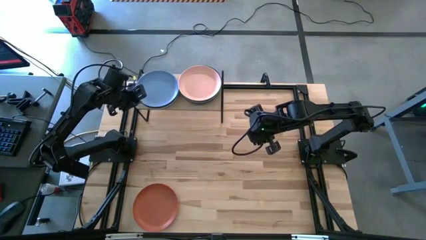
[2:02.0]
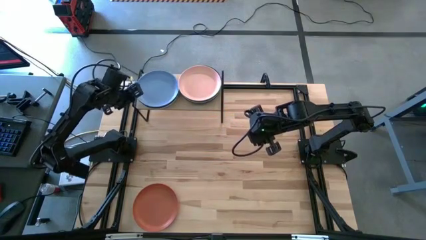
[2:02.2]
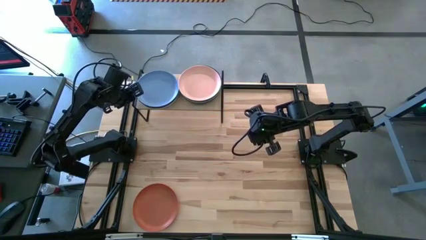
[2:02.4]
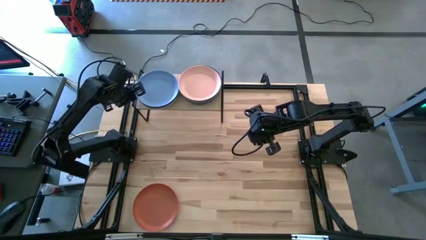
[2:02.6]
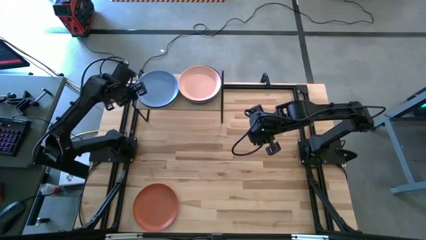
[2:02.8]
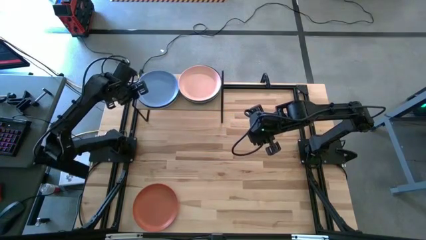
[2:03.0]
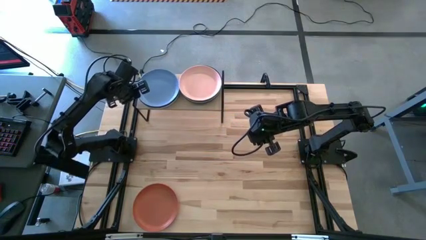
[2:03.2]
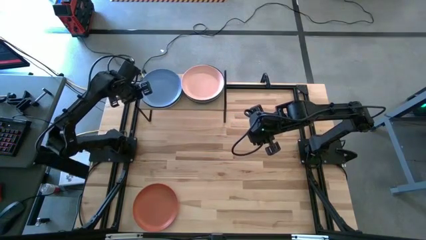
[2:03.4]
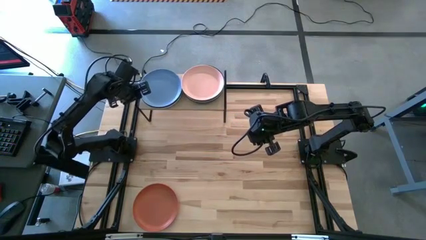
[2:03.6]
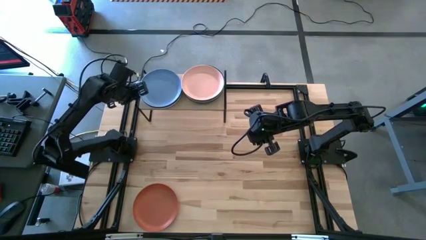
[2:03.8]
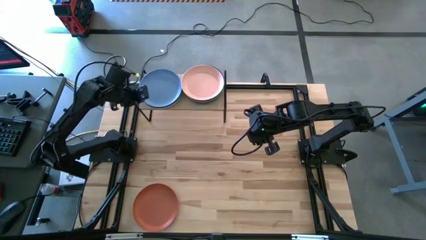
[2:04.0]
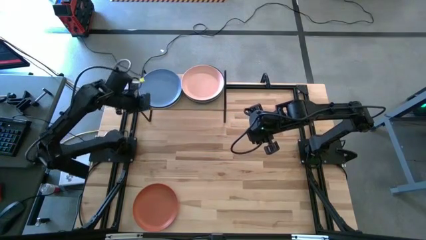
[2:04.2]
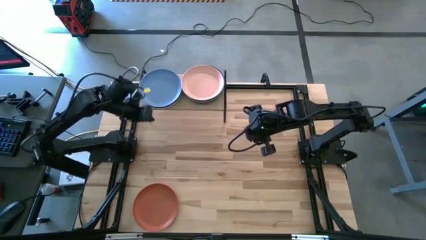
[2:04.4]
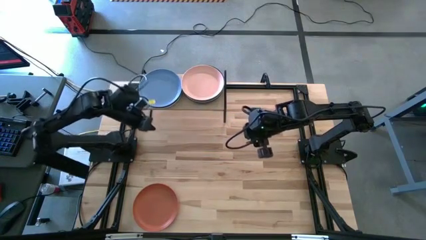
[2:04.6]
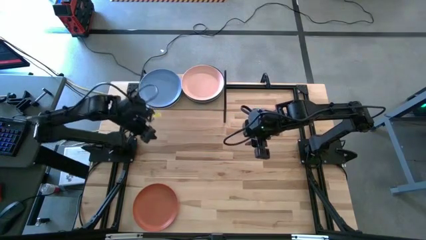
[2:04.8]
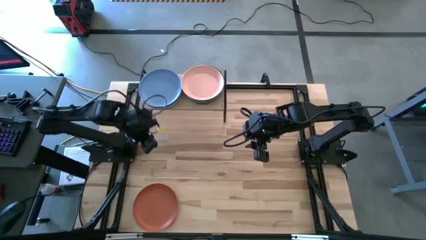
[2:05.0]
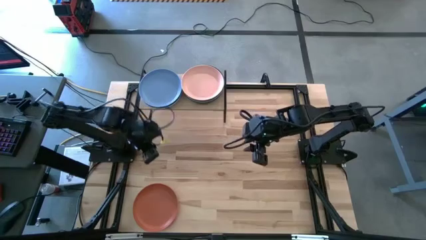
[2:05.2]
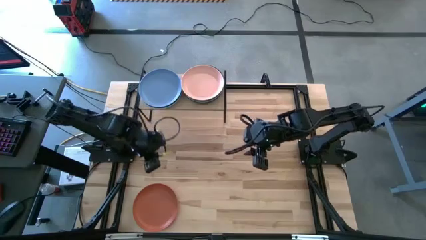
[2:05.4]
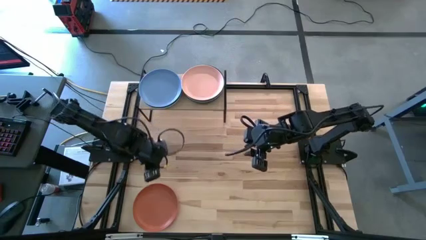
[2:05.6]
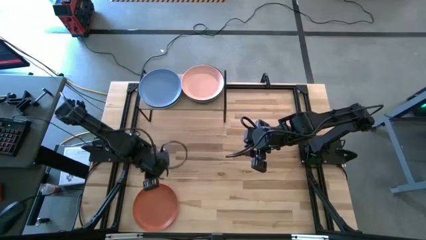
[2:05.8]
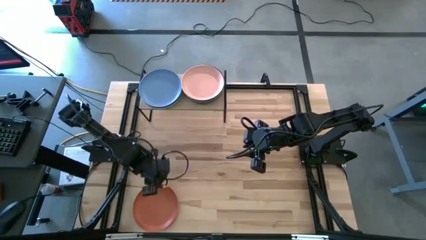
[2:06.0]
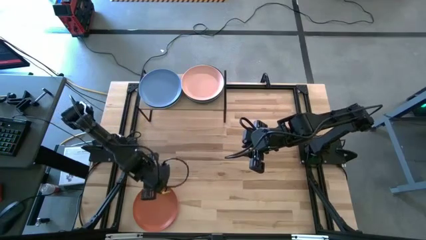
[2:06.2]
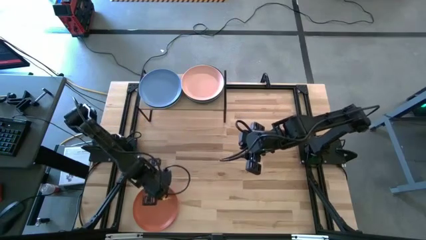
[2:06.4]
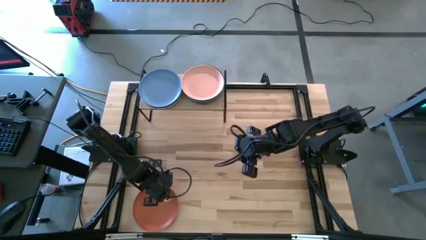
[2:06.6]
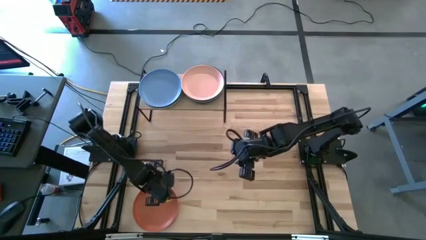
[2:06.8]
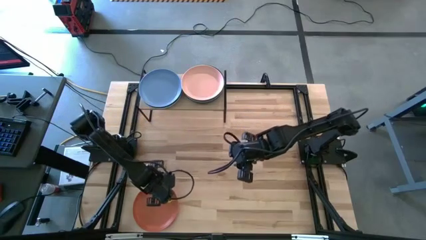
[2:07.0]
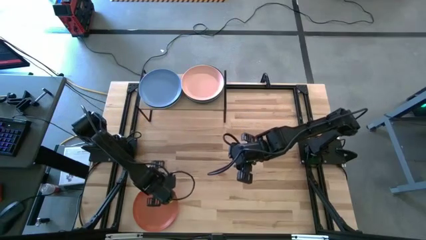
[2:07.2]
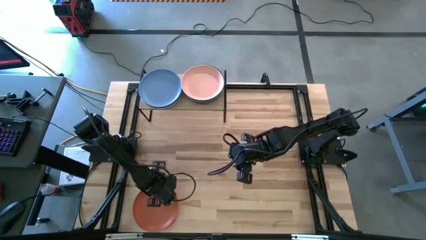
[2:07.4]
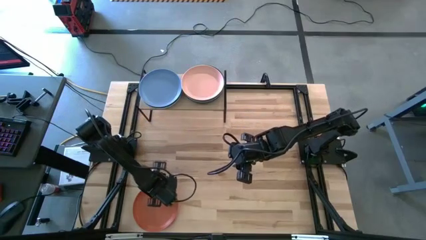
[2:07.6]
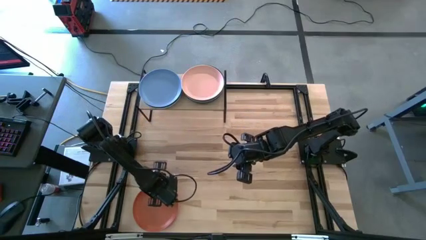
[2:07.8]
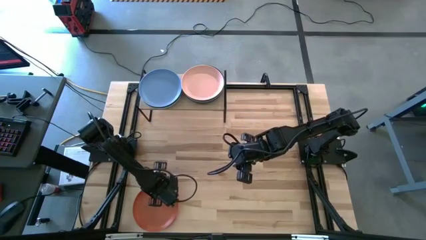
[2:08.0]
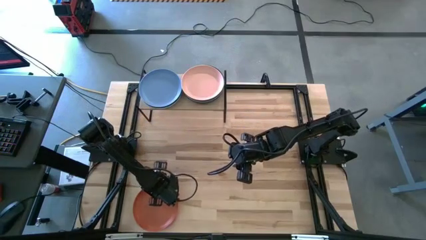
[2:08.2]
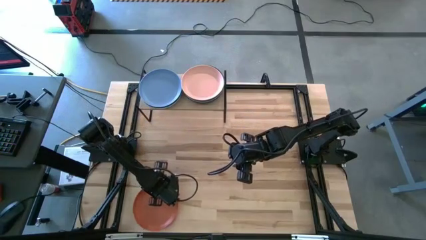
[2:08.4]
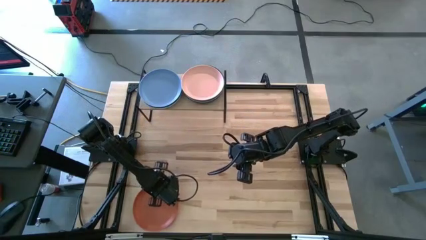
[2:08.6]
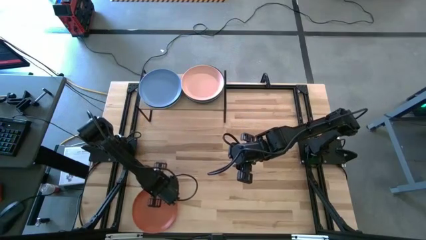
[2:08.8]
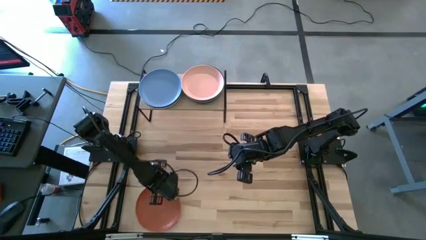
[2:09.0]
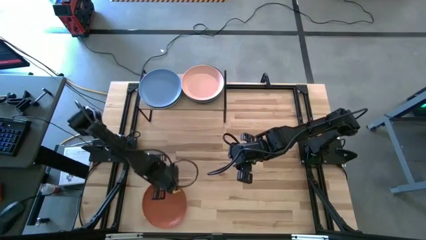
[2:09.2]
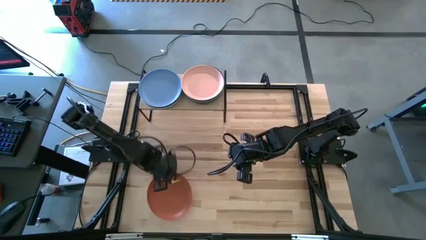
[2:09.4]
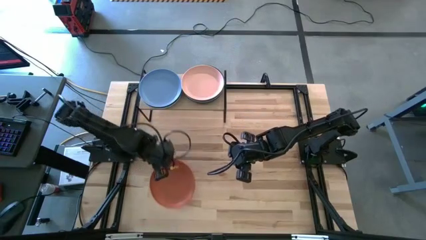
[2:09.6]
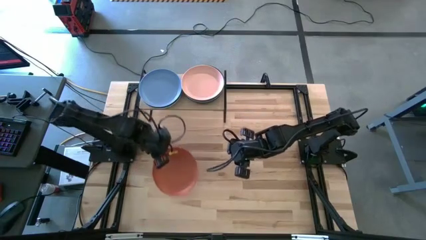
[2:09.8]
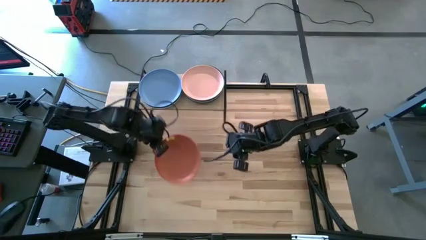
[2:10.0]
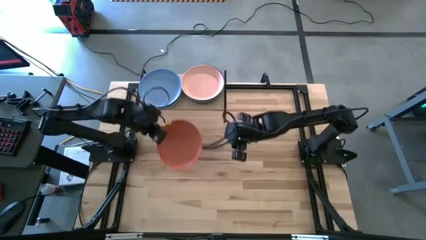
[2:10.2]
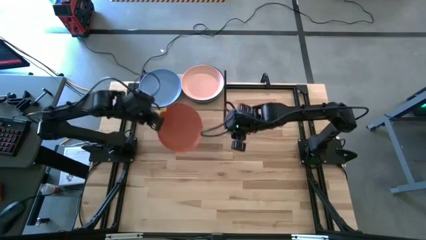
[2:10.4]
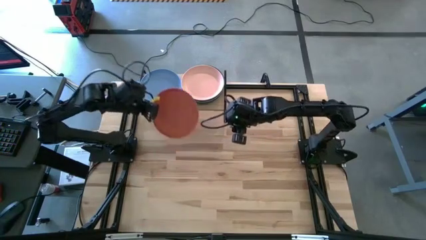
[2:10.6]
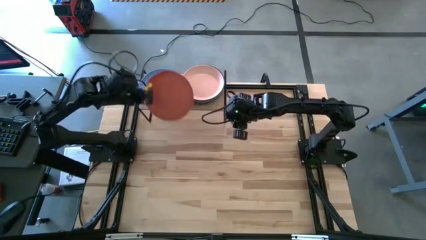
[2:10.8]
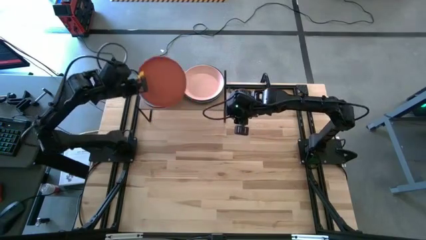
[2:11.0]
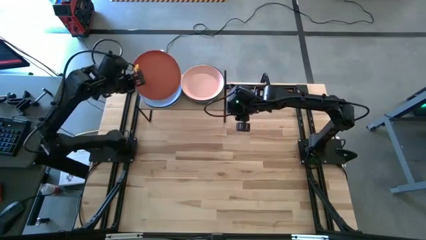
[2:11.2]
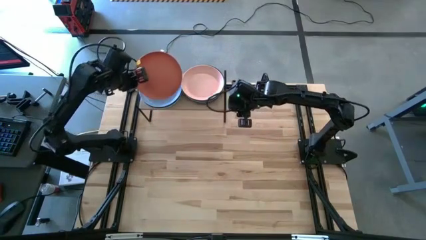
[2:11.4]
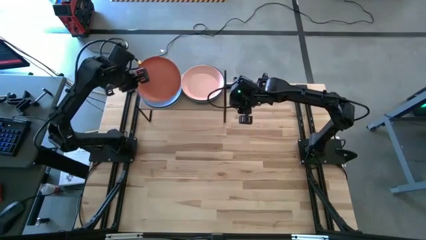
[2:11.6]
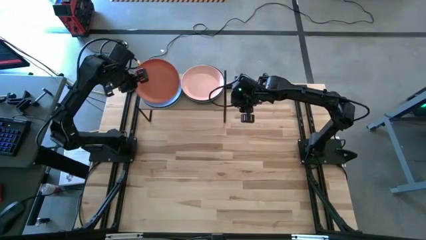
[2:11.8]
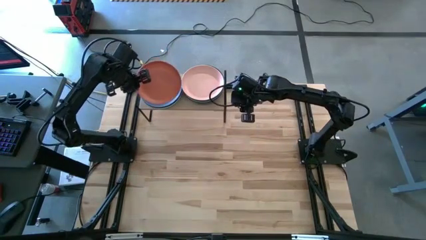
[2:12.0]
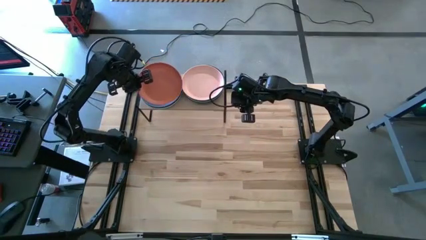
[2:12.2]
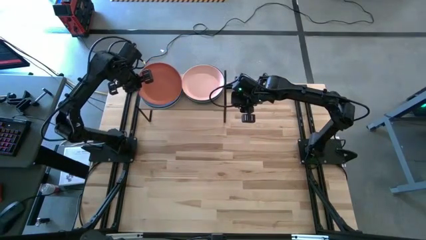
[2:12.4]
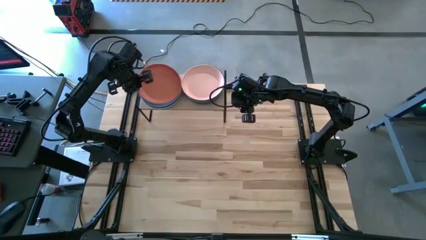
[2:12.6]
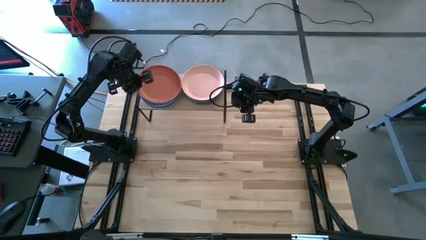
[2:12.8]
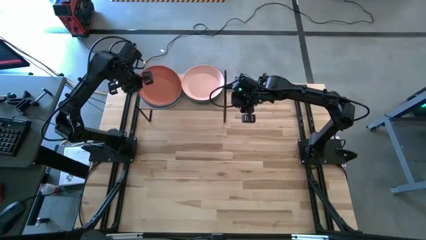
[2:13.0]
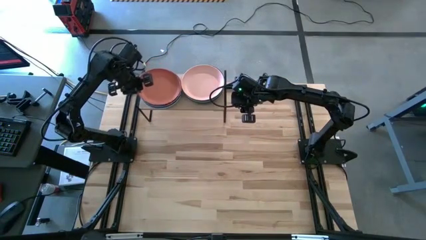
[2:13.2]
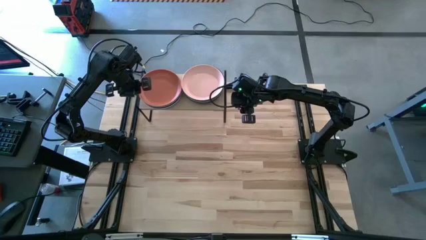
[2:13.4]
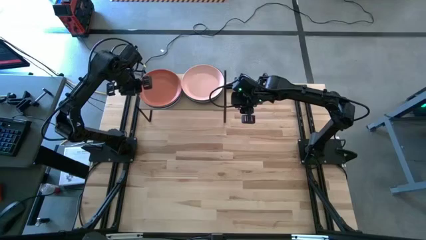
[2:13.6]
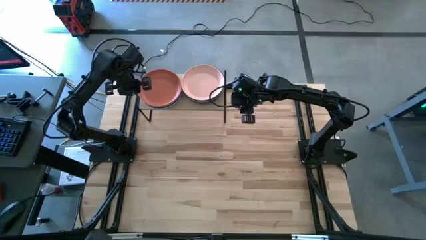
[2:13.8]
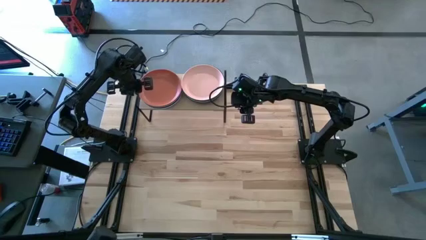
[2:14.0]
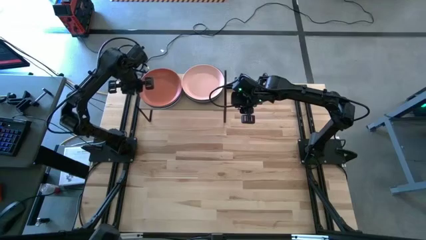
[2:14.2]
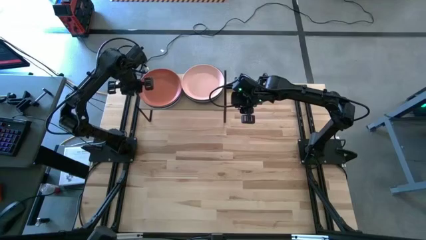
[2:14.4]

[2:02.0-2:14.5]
Task: Place and stack plates onto a shelf
Stack the orange plate on top of the blue plate on the shelf
